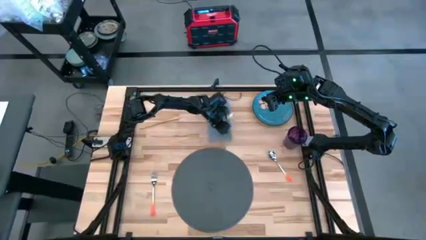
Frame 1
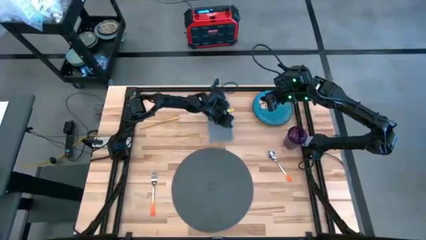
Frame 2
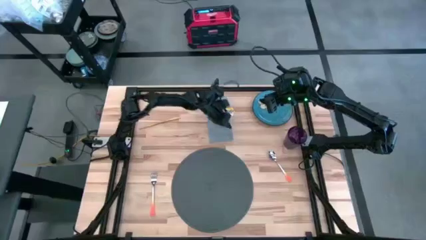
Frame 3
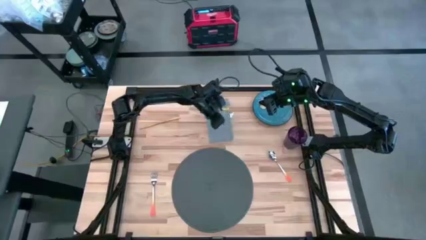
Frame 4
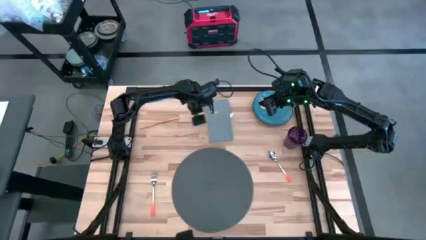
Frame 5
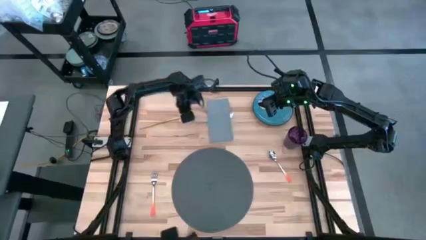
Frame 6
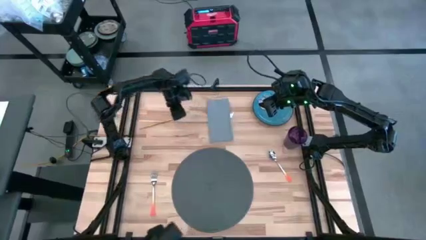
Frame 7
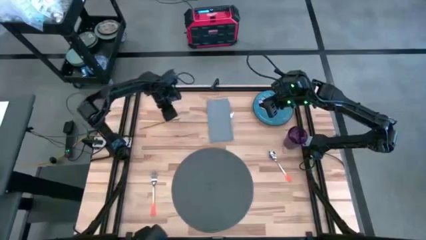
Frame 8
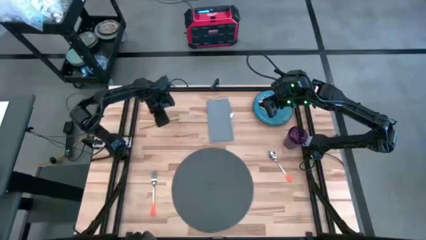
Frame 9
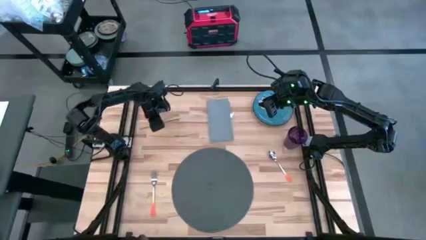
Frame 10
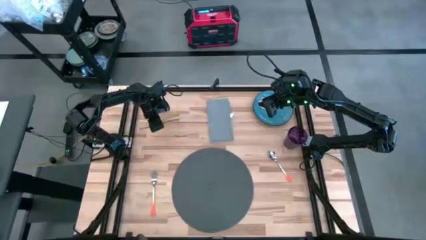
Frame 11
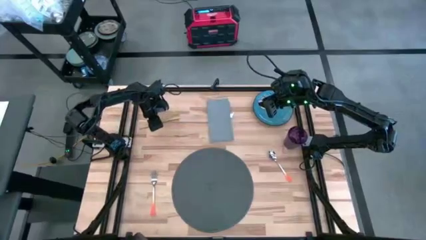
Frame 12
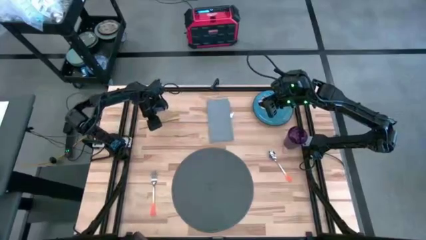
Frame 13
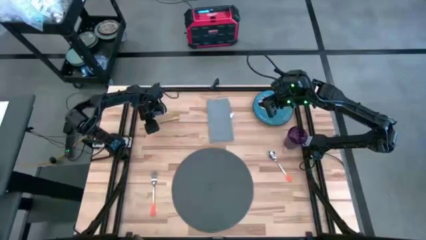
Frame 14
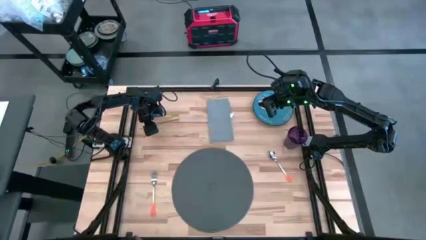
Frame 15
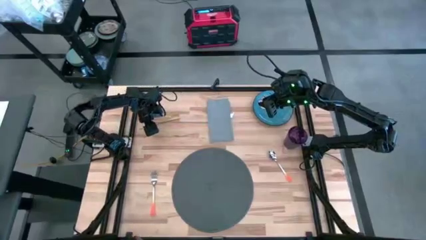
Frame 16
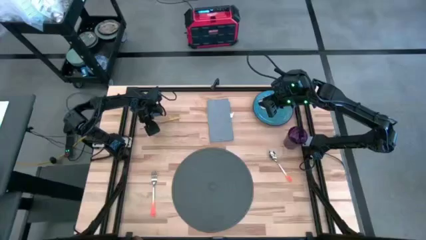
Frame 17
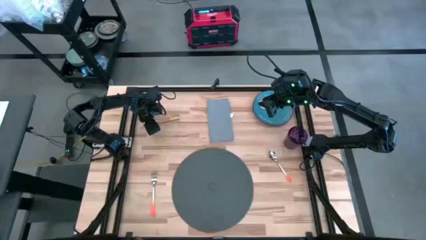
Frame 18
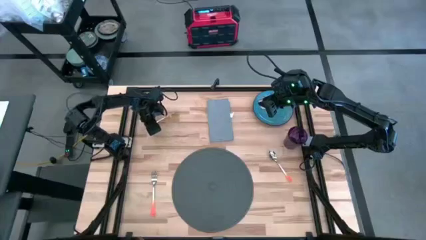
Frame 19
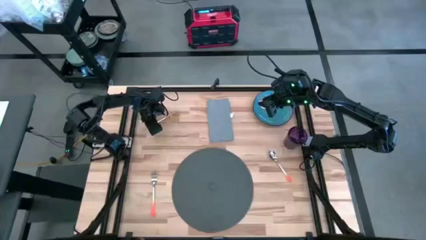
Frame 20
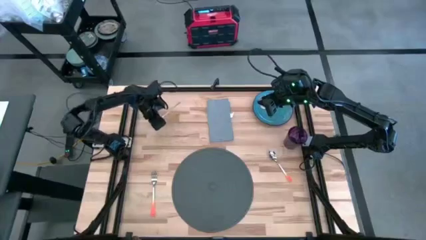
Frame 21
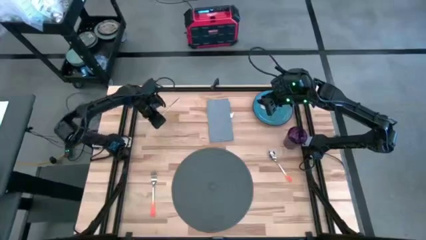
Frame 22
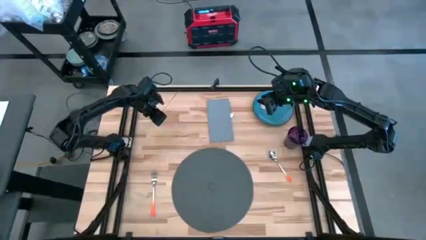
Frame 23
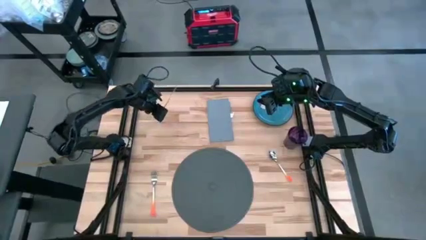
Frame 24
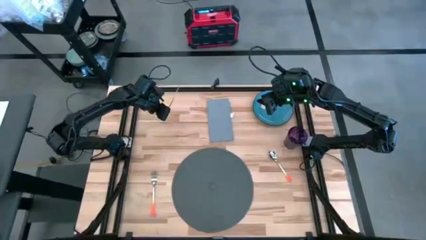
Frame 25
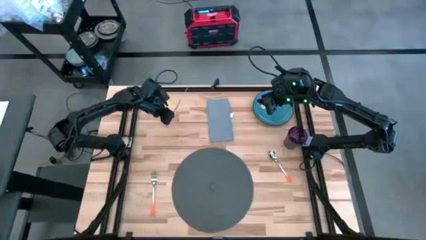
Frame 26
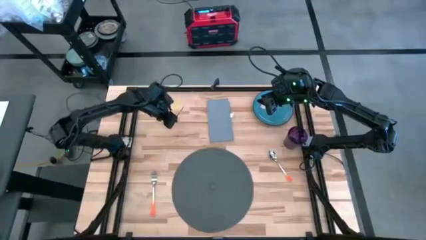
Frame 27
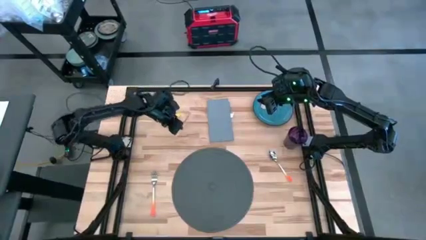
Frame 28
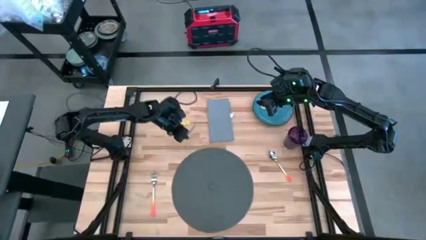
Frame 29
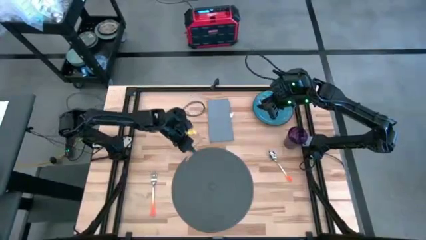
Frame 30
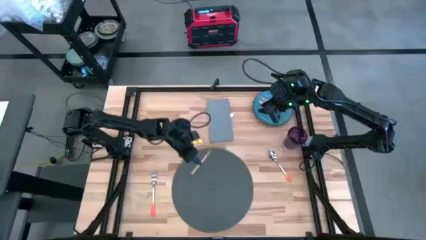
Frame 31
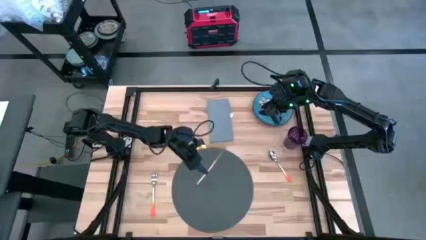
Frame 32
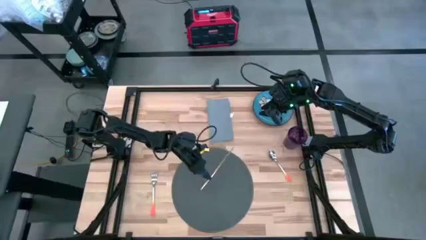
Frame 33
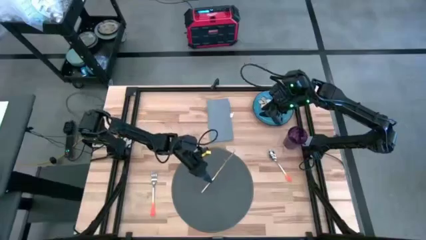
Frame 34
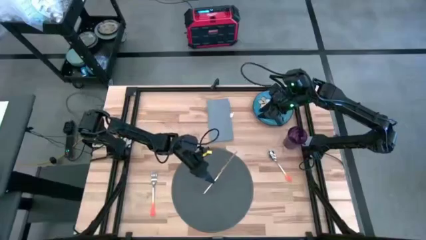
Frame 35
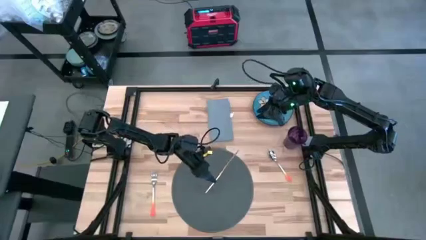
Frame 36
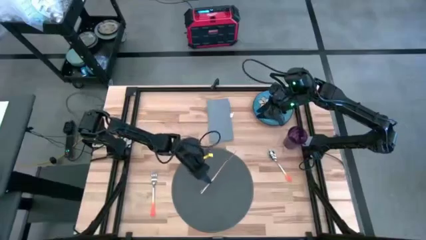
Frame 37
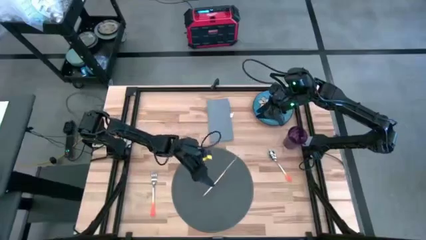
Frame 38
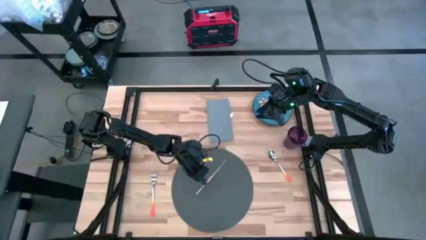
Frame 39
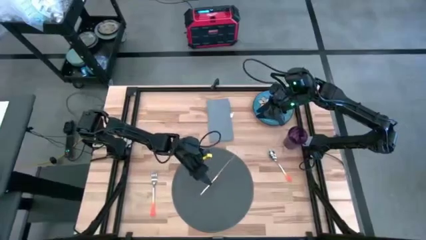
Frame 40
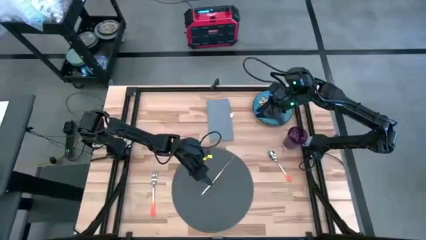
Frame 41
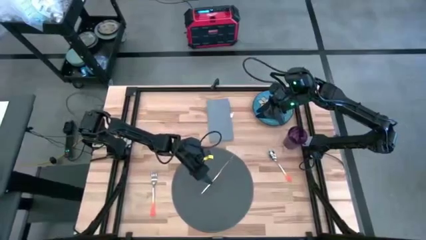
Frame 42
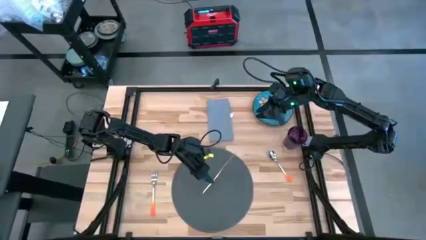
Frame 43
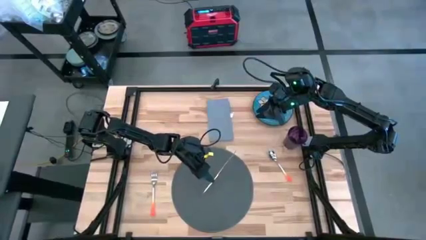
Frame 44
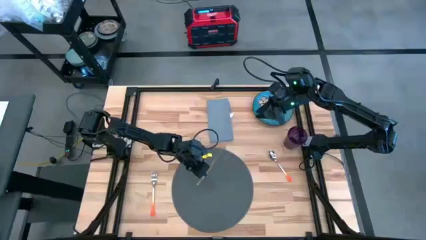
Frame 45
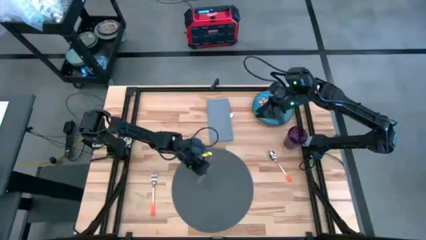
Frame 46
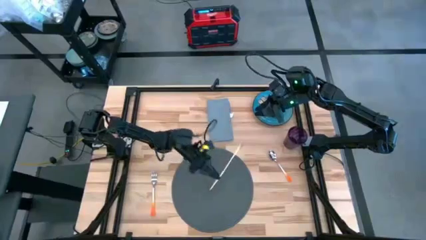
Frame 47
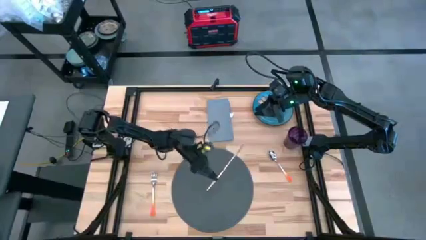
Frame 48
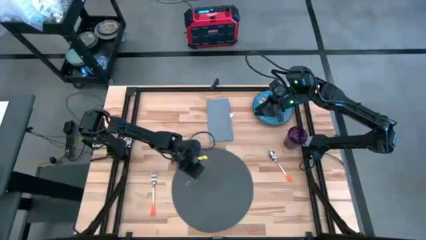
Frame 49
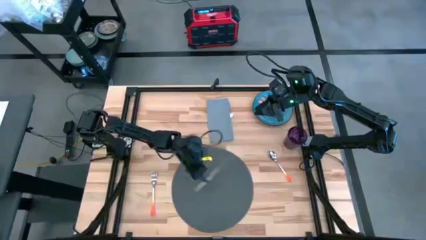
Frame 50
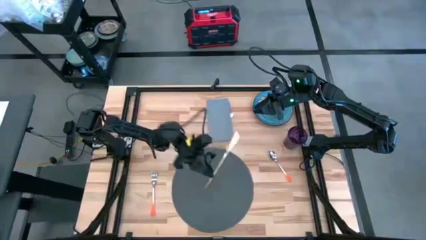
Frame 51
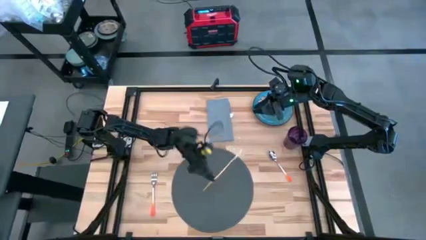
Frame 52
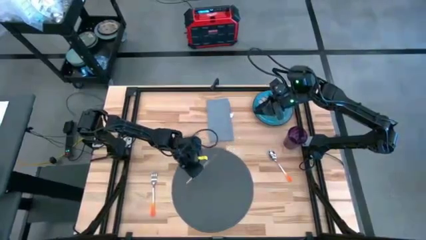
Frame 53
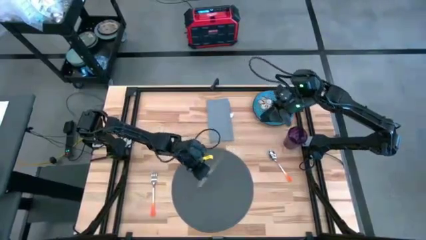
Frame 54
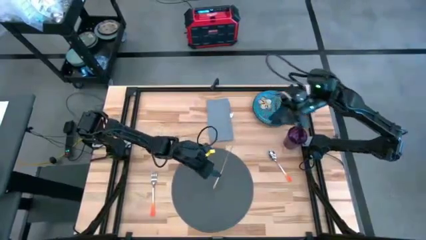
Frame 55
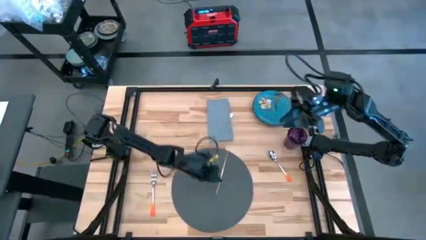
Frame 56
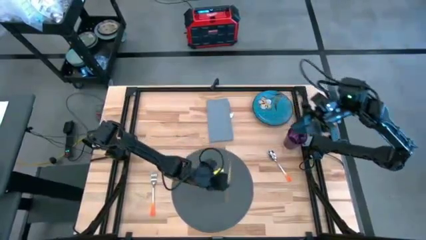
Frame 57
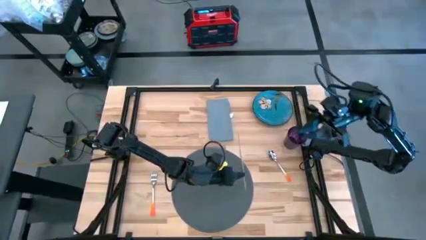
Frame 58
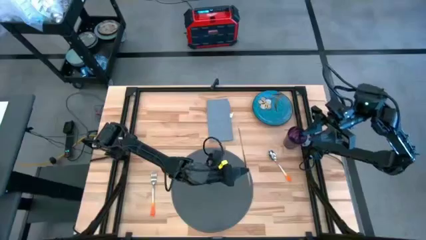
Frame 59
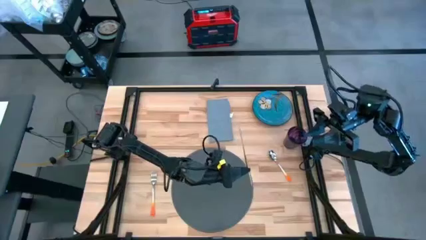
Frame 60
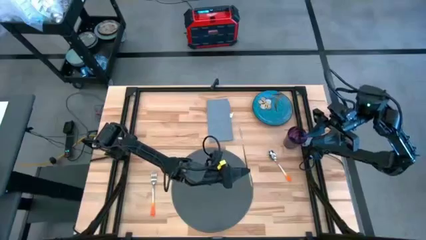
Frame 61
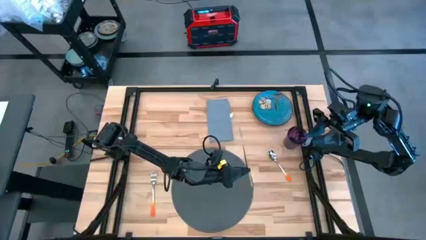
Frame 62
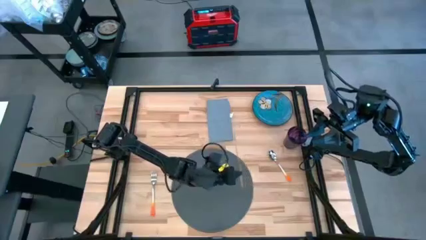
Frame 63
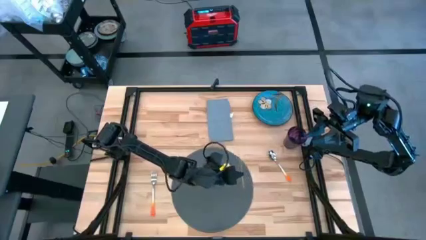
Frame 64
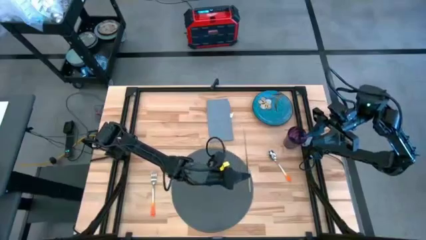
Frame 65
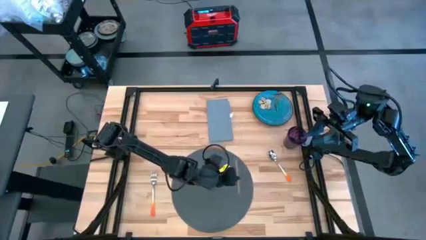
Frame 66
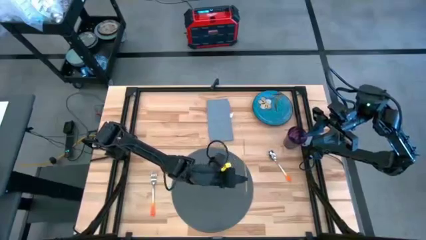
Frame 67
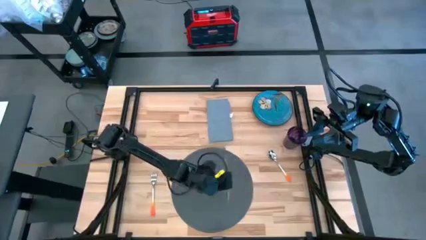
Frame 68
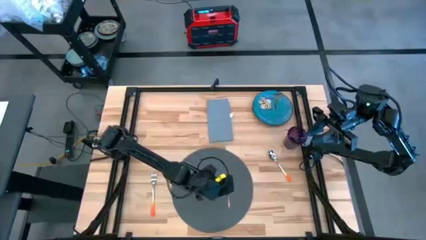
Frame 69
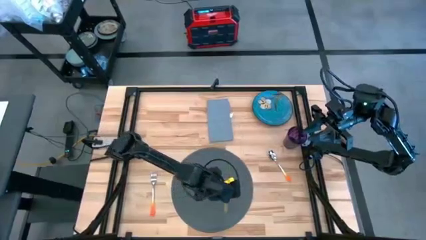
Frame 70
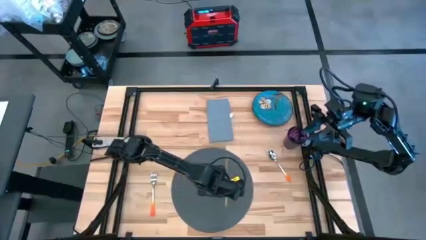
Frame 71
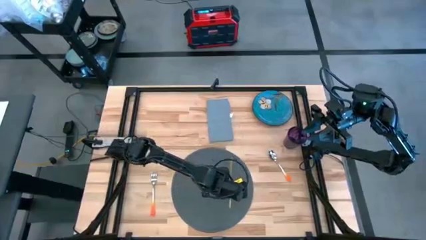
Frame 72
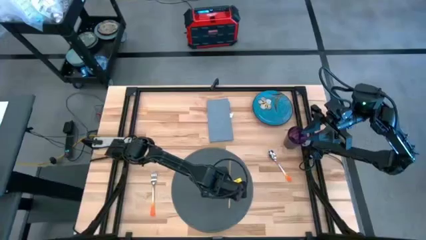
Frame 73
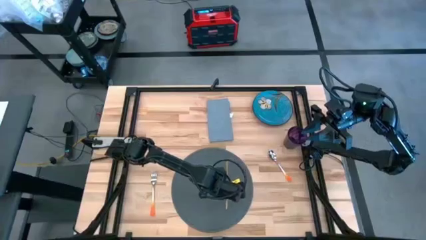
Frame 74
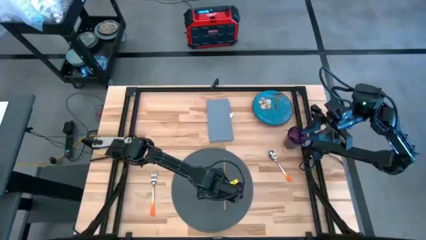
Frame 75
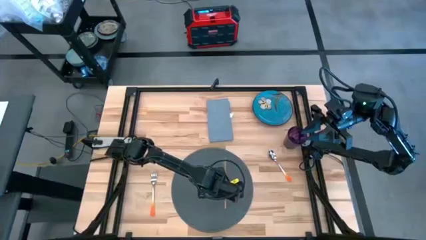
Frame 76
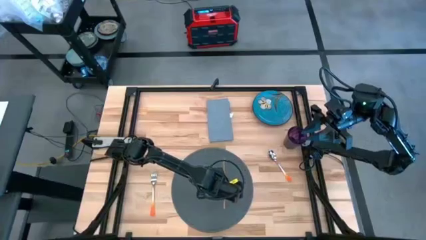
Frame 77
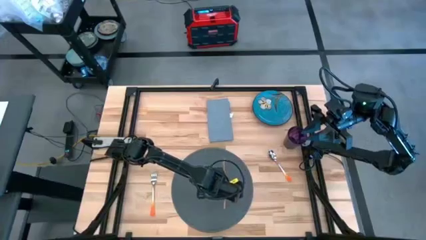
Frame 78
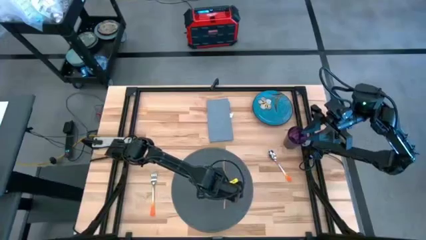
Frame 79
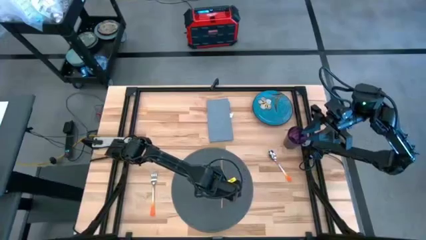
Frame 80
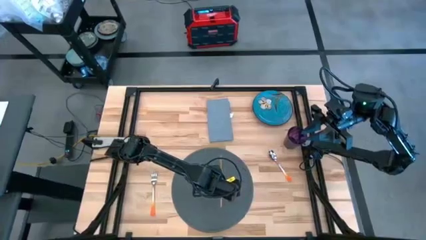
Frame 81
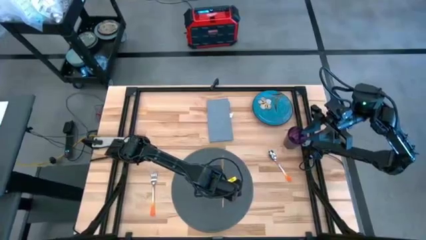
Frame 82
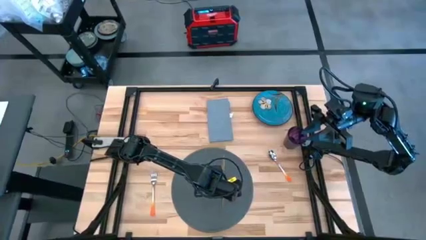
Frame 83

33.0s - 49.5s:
Task: Set table place
Put the gold table knife on the gray table mat
